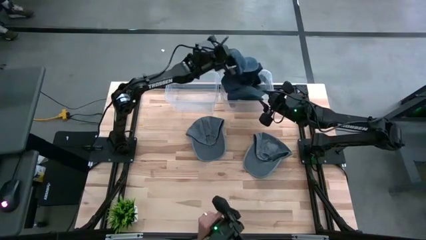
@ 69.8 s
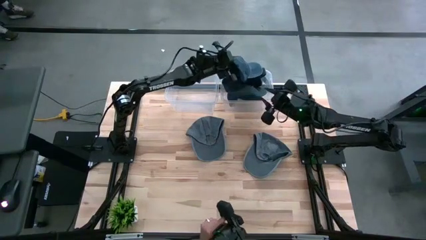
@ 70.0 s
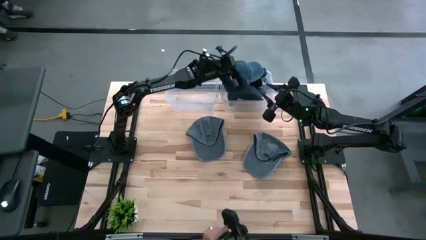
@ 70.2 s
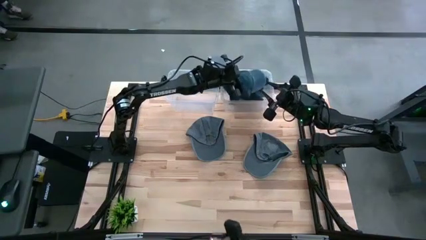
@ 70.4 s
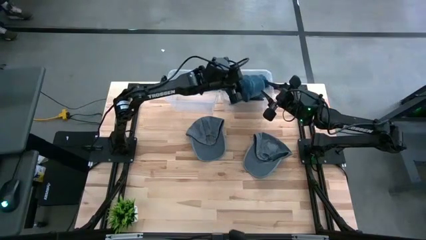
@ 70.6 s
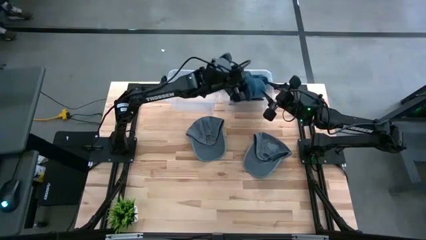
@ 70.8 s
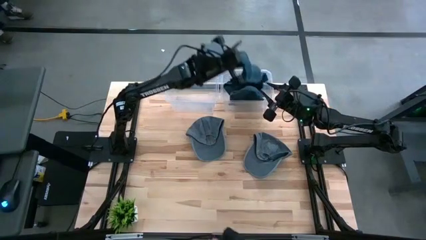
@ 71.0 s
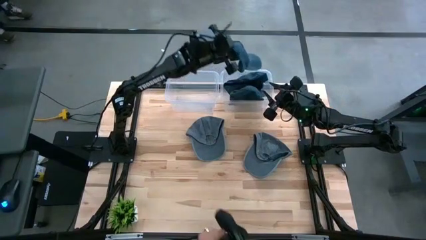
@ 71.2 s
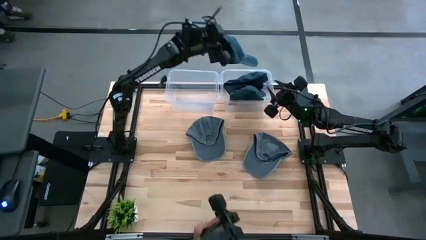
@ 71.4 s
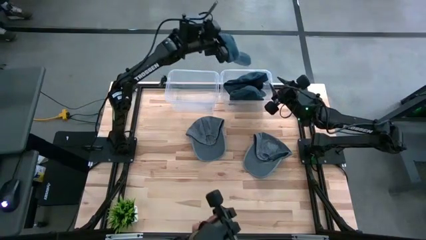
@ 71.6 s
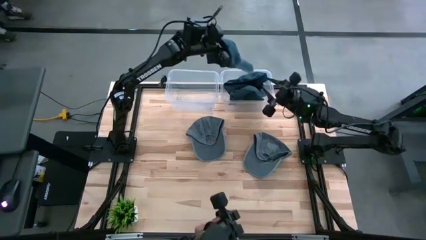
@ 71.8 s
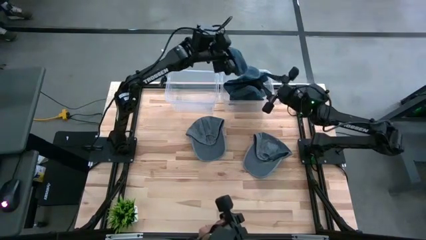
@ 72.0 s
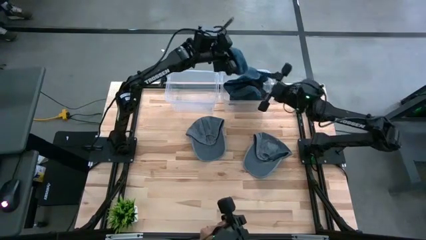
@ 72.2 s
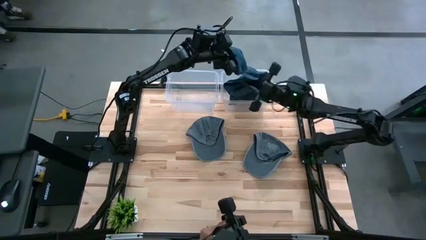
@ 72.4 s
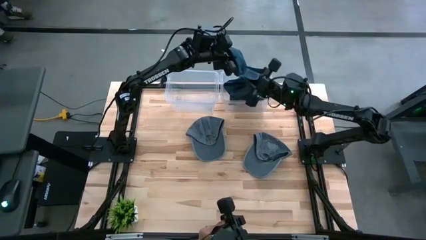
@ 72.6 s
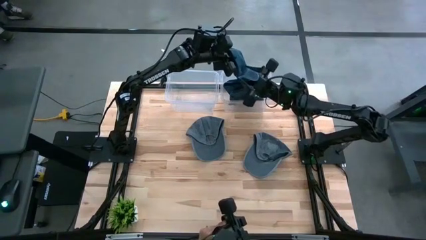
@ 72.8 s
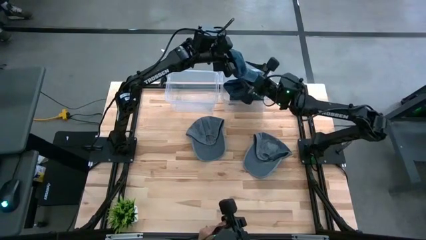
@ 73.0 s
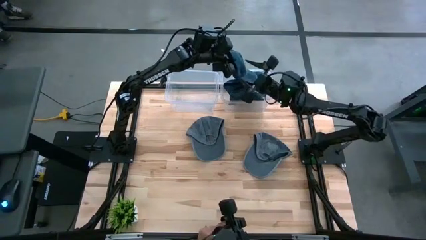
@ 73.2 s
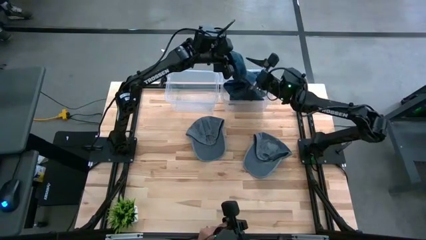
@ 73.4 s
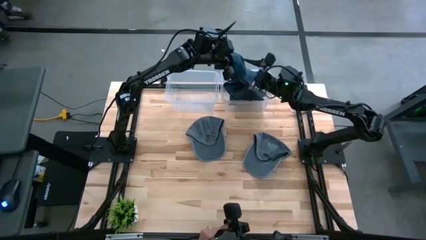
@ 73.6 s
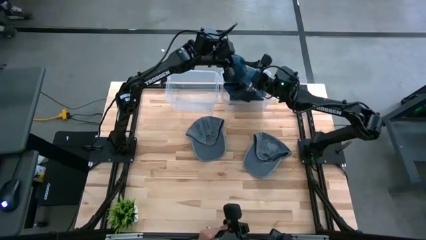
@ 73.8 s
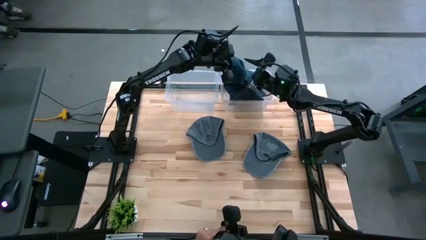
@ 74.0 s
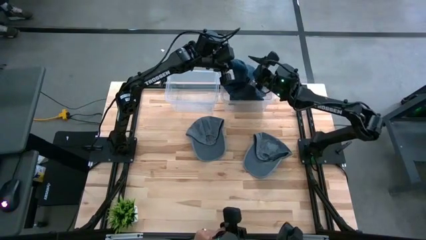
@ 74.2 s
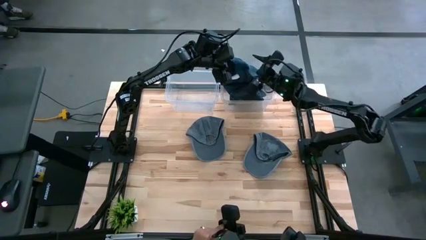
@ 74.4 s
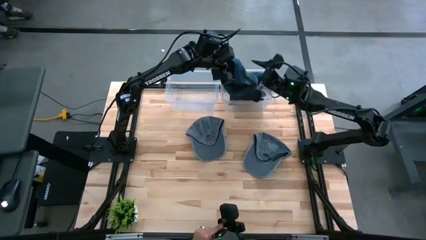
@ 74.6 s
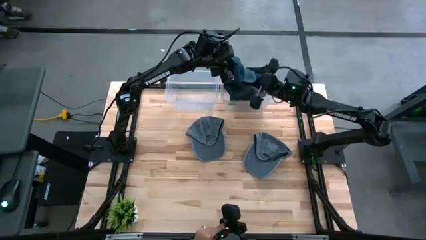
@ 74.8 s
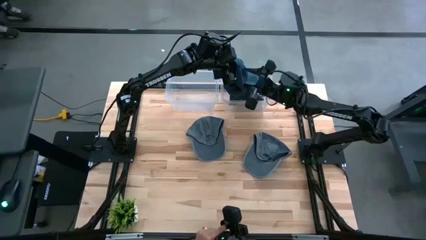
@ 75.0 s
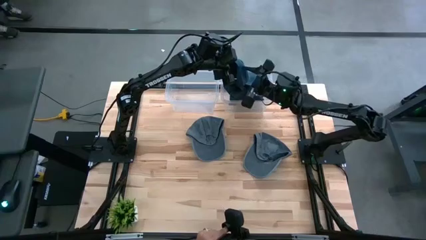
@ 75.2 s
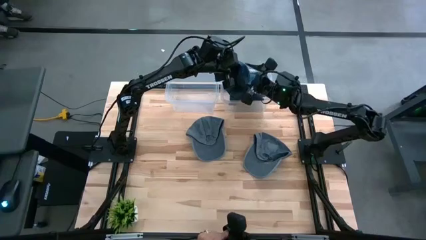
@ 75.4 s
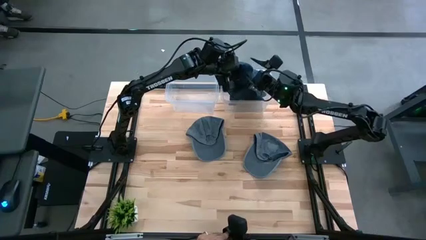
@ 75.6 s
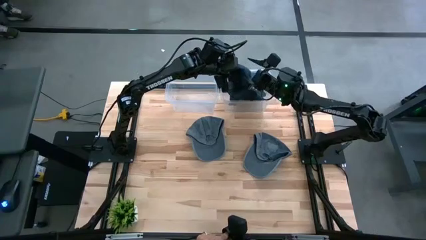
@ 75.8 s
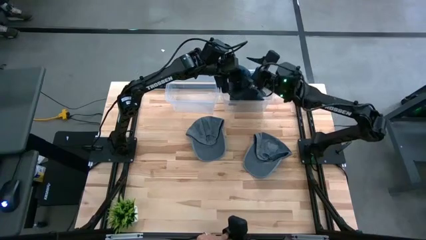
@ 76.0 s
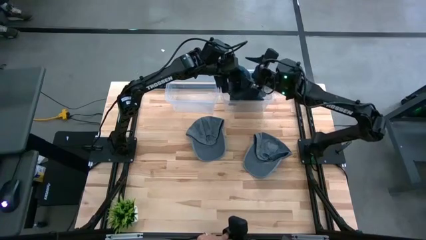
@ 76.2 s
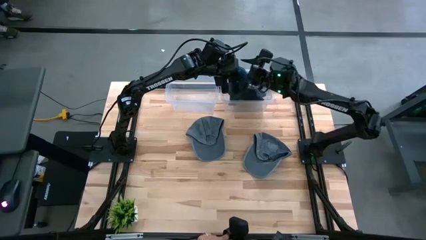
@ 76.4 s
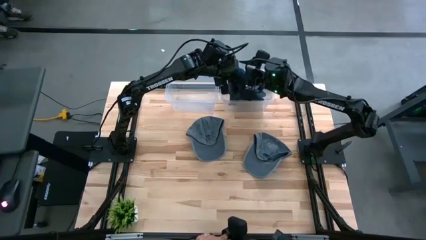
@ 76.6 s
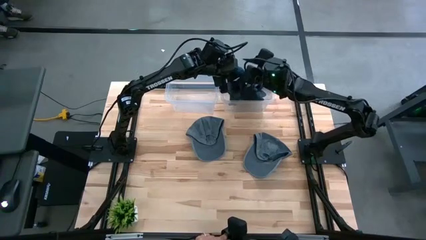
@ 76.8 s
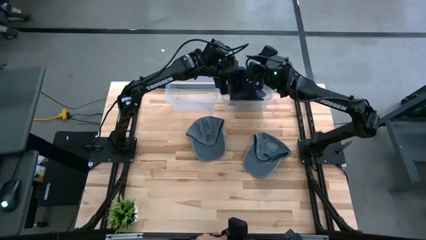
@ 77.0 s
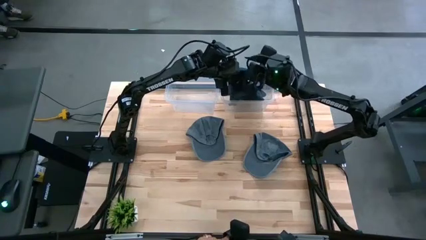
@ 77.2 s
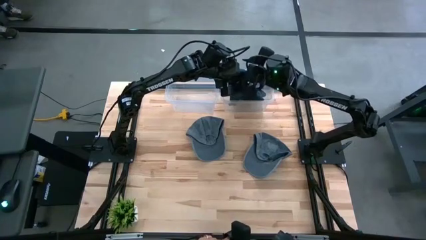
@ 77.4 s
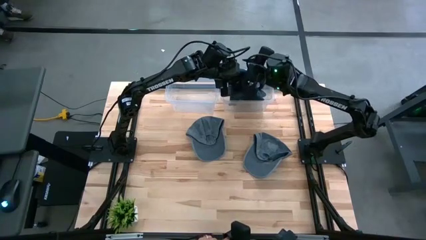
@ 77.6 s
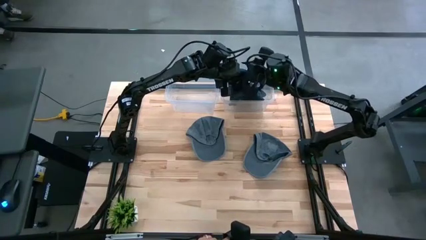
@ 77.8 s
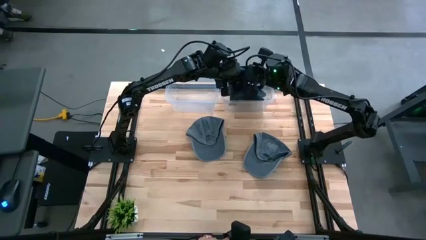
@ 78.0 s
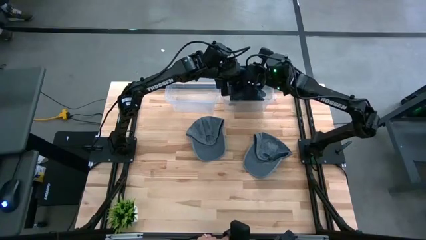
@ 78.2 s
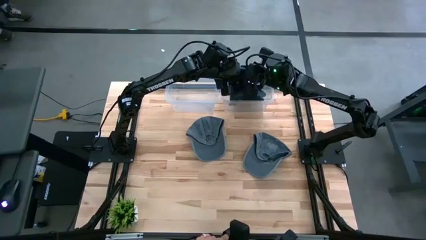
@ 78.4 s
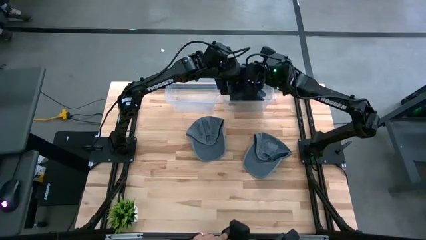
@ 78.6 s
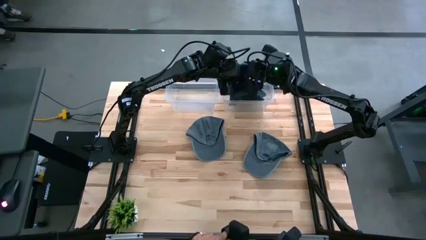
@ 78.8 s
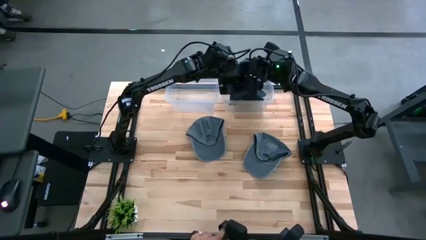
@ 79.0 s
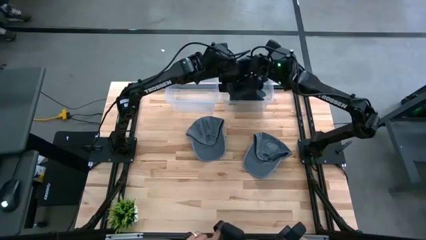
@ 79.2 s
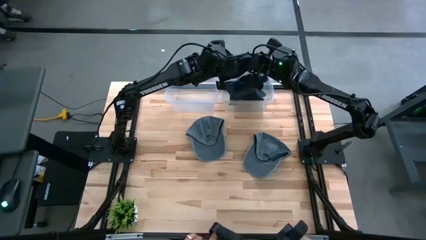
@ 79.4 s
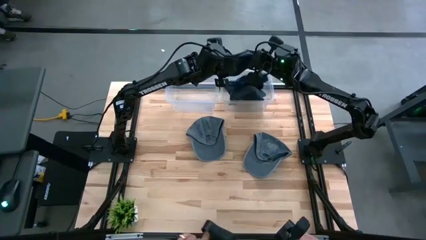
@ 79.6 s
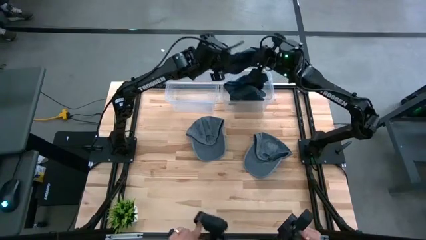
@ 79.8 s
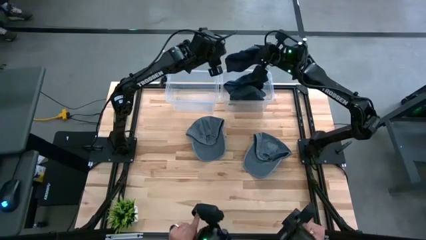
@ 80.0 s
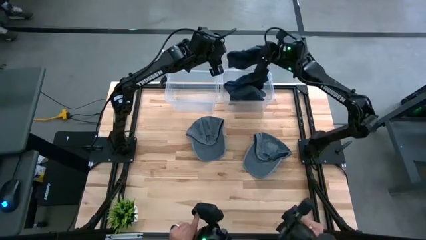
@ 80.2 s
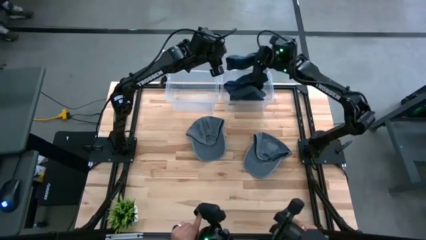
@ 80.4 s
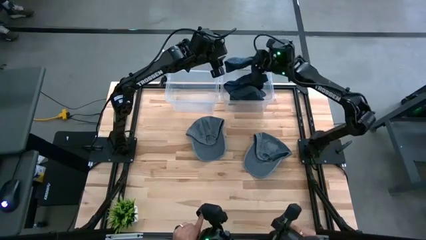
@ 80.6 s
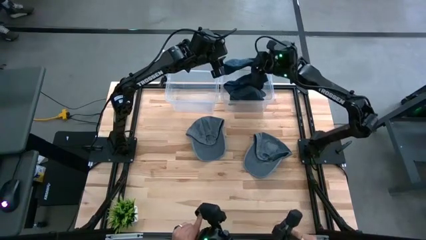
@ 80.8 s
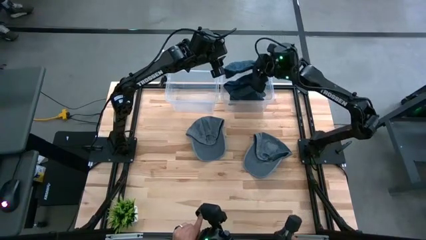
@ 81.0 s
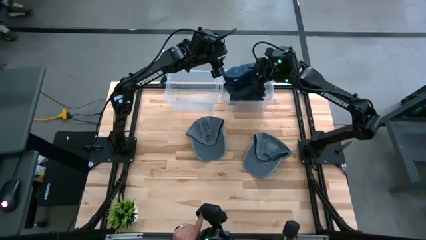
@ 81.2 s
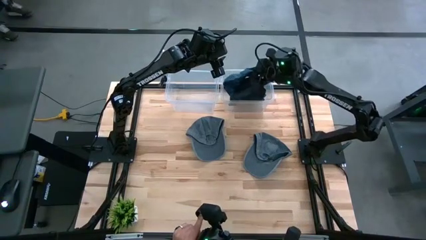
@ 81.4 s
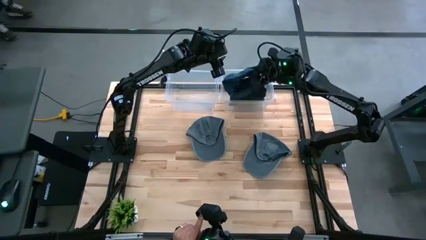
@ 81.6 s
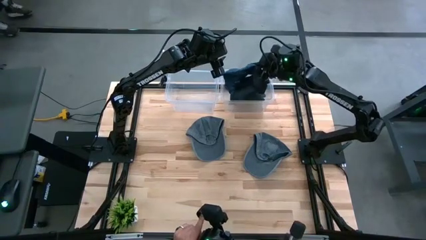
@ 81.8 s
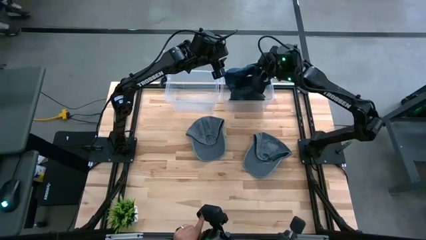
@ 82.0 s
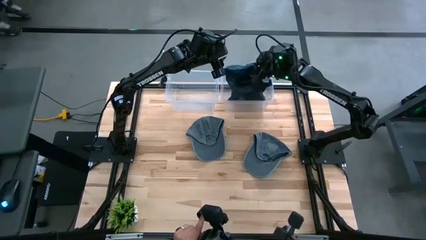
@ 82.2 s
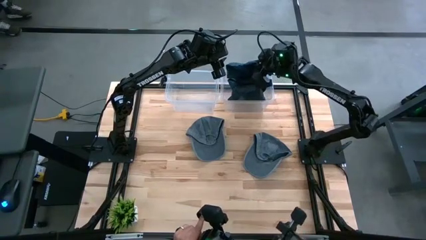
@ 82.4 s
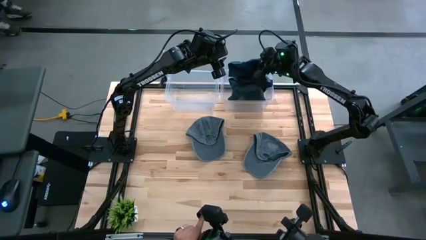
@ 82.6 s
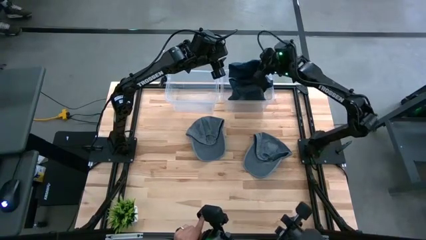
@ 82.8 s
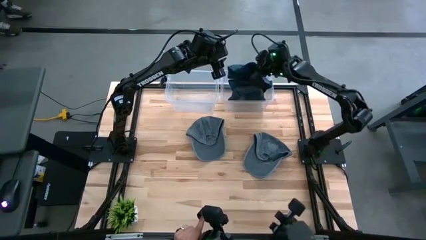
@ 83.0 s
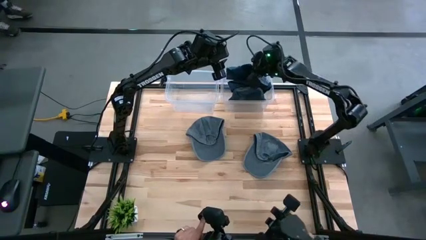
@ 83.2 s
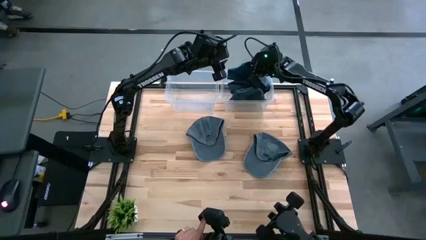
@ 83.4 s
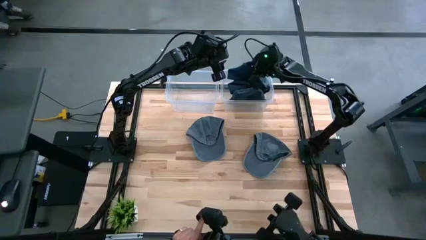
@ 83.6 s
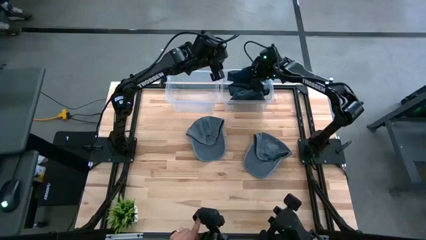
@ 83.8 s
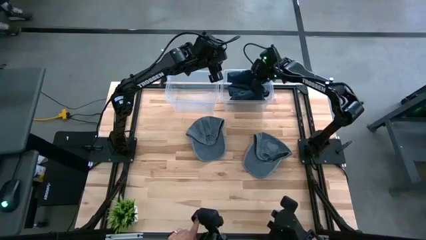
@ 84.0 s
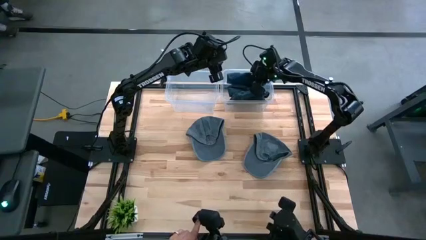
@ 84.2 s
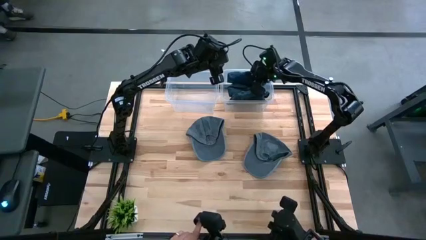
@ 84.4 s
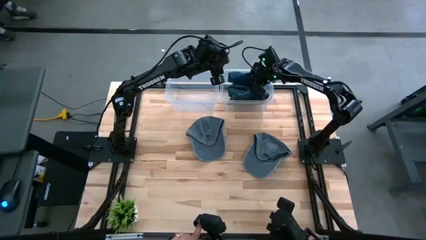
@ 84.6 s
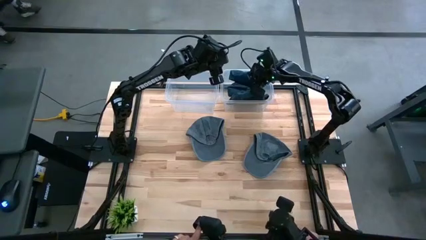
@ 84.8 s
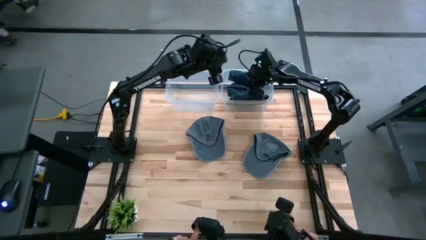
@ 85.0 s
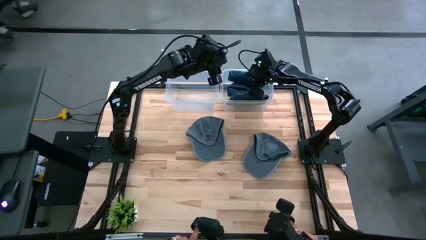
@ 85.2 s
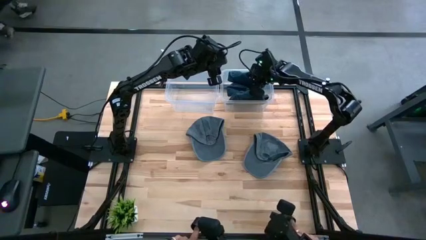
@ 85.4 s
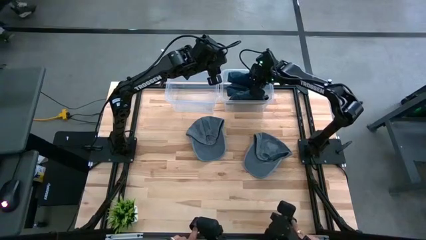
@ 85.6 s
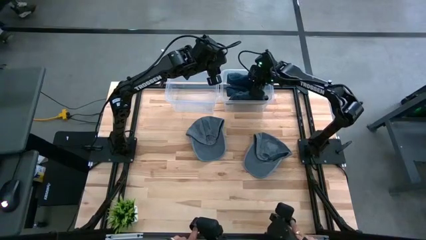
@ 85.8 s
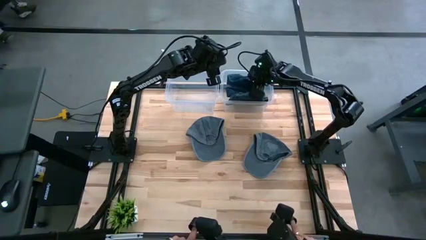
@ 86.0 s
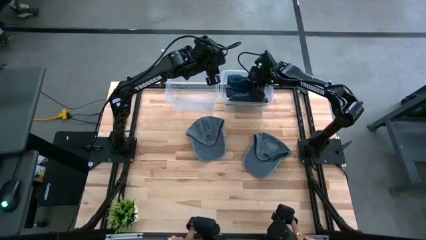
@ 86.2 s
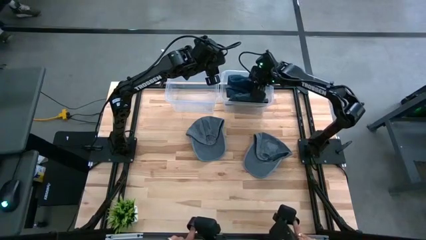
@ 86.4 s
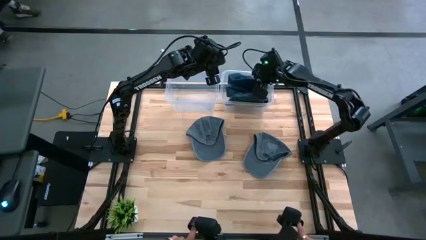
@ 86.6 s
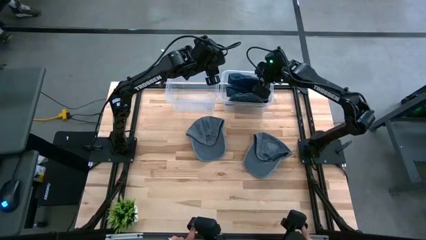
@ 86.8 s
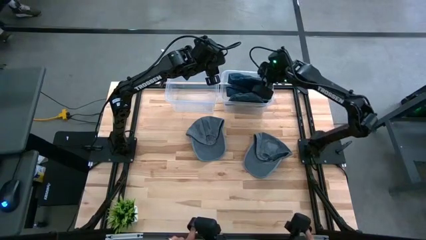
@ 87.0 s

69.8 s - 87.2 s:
Task: Pick & Place hat
Put the blue cap into the right transparent bin
